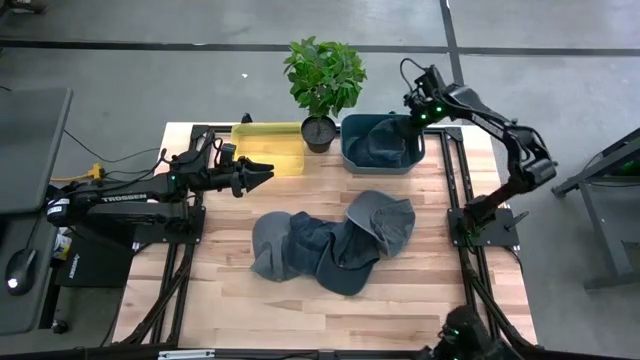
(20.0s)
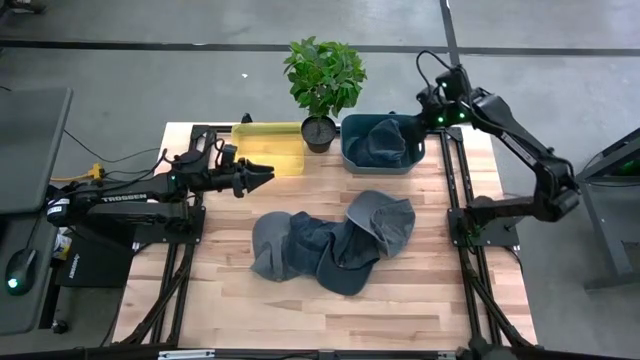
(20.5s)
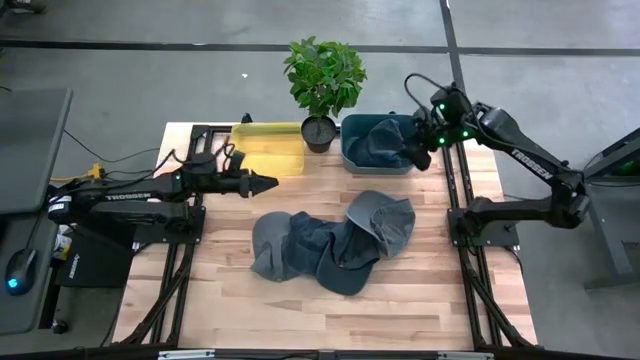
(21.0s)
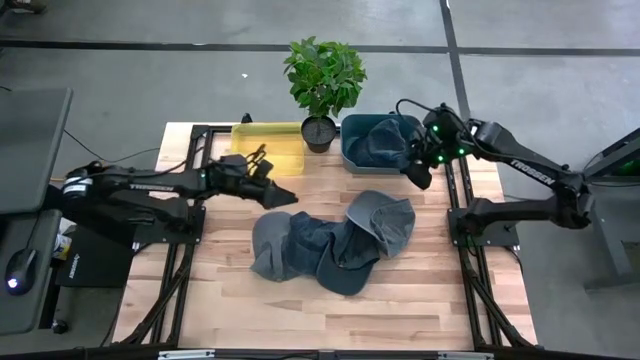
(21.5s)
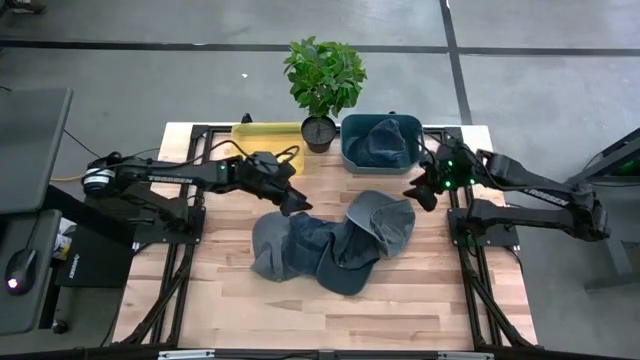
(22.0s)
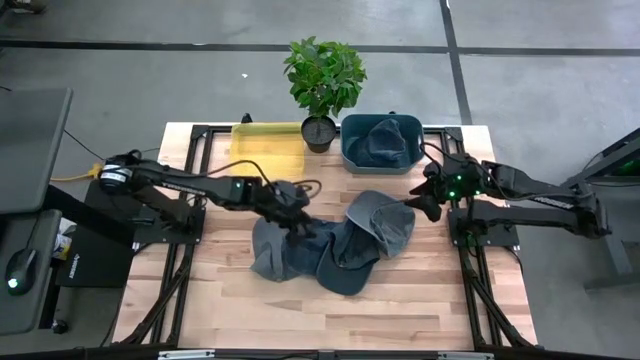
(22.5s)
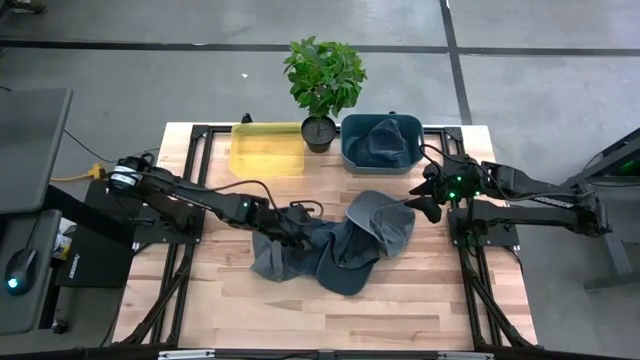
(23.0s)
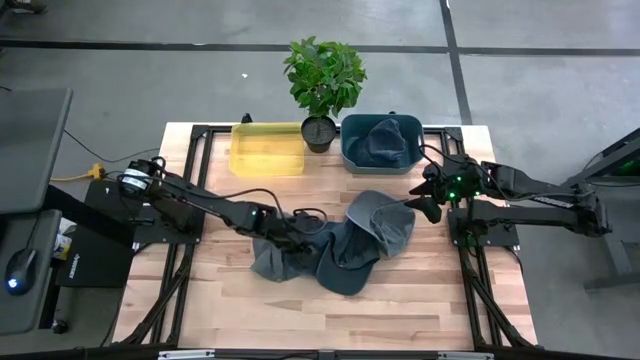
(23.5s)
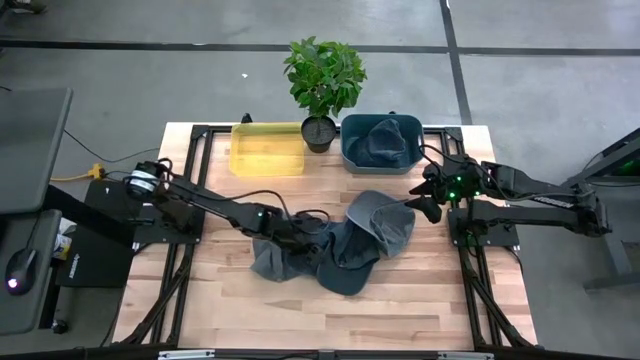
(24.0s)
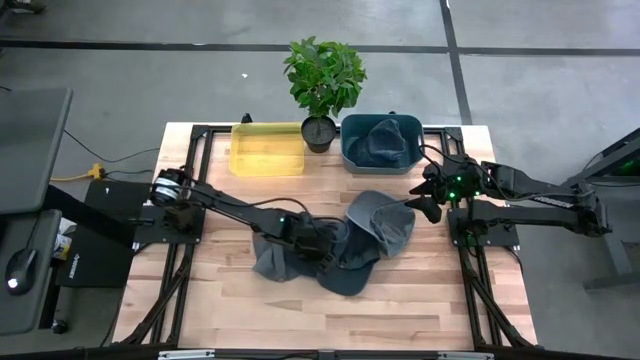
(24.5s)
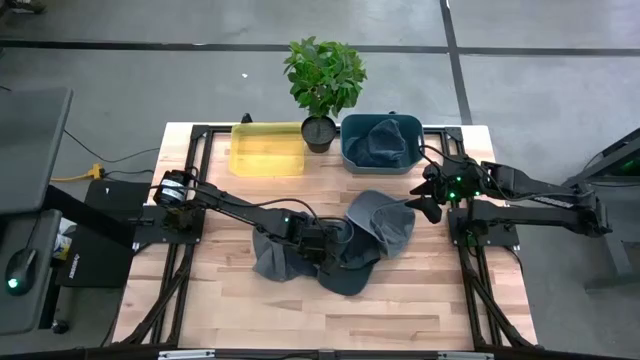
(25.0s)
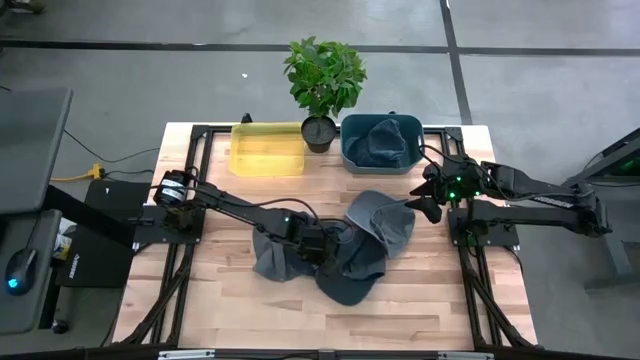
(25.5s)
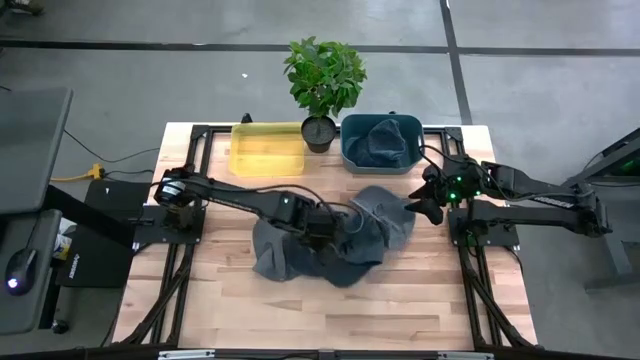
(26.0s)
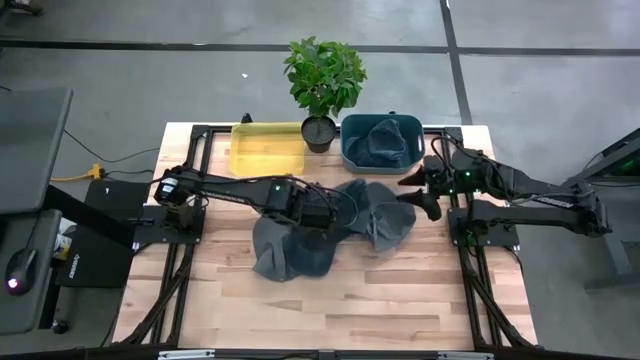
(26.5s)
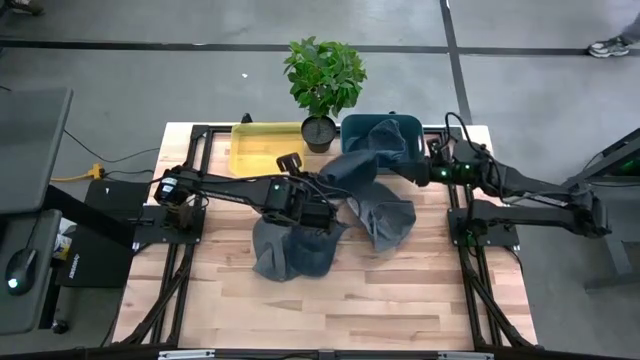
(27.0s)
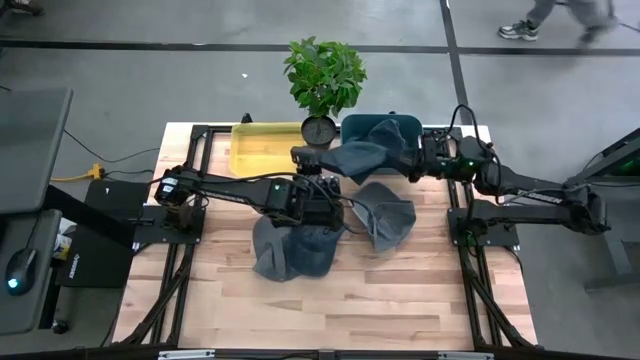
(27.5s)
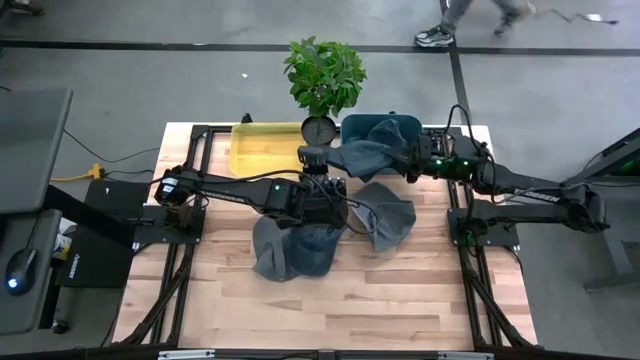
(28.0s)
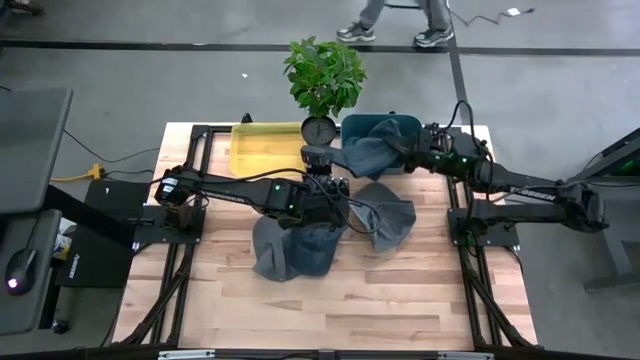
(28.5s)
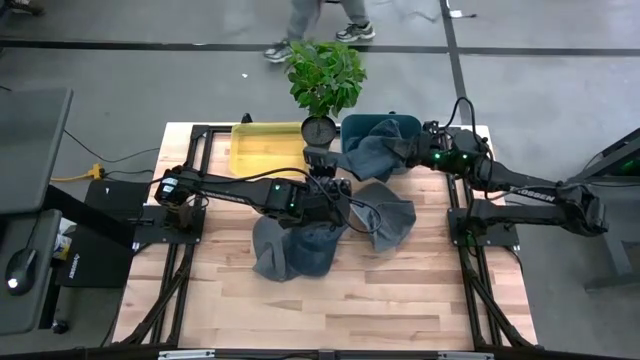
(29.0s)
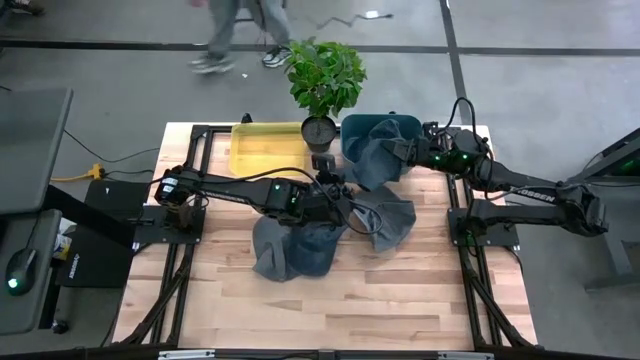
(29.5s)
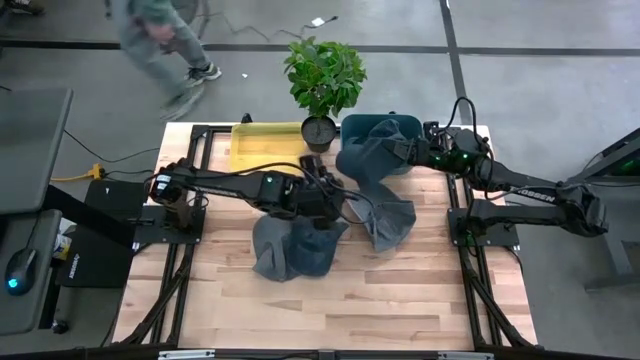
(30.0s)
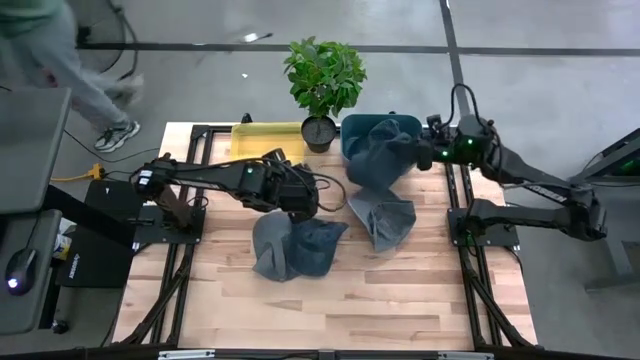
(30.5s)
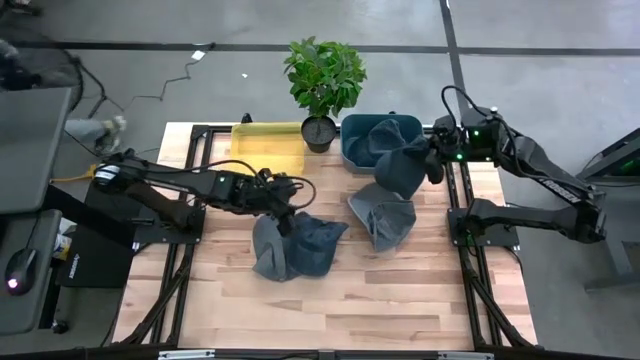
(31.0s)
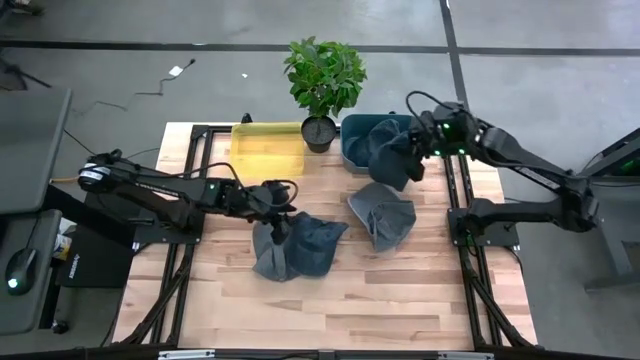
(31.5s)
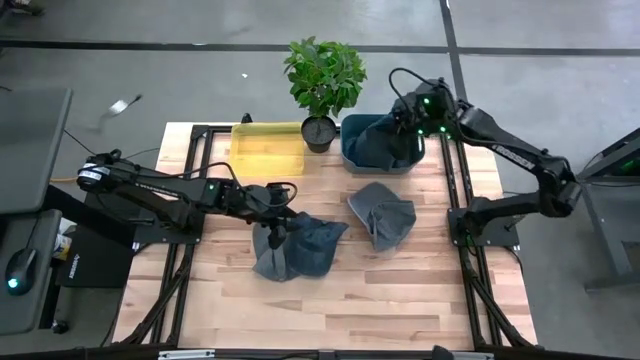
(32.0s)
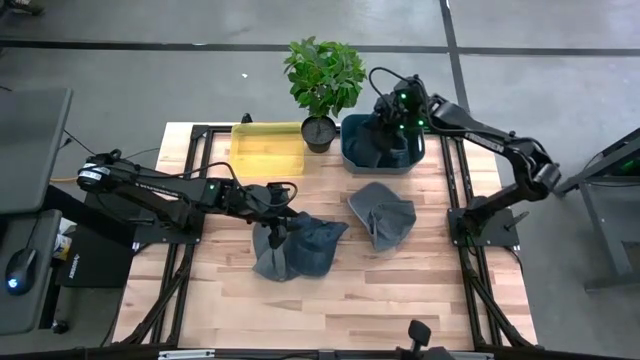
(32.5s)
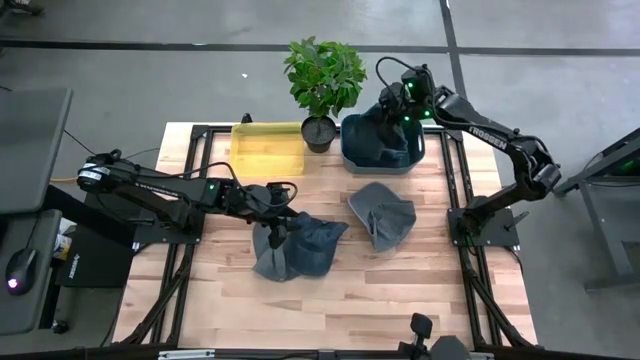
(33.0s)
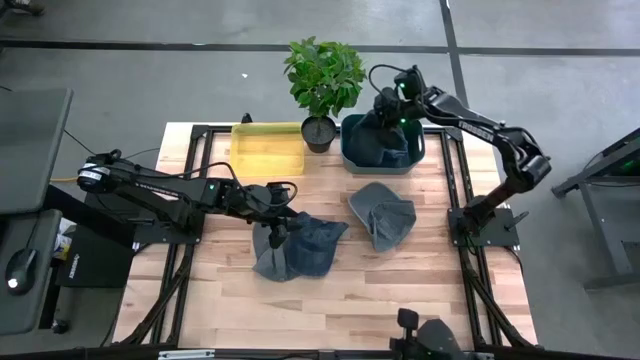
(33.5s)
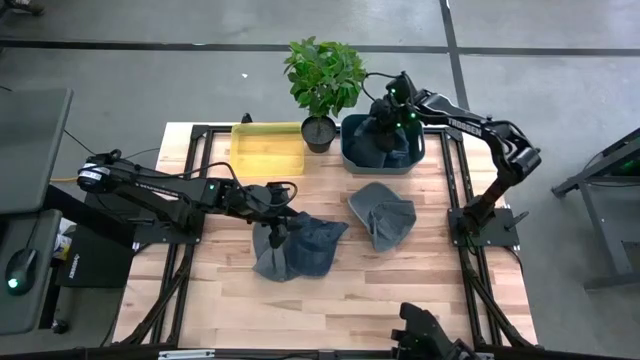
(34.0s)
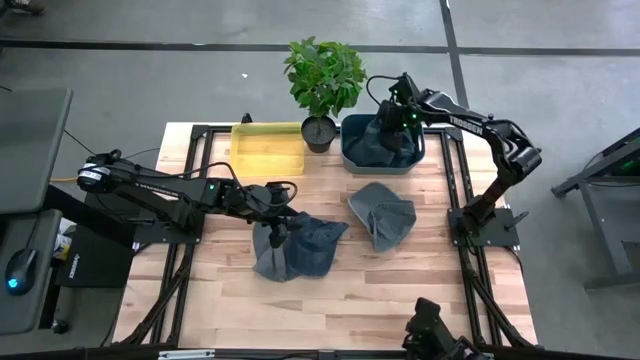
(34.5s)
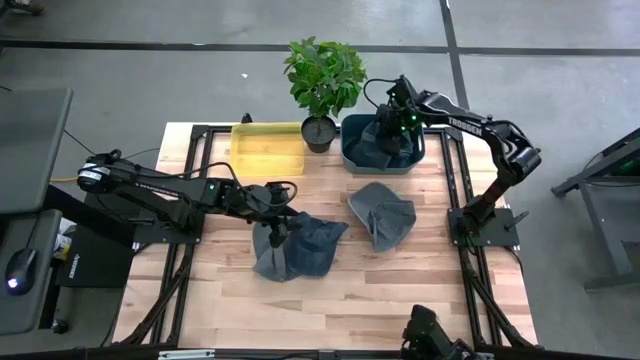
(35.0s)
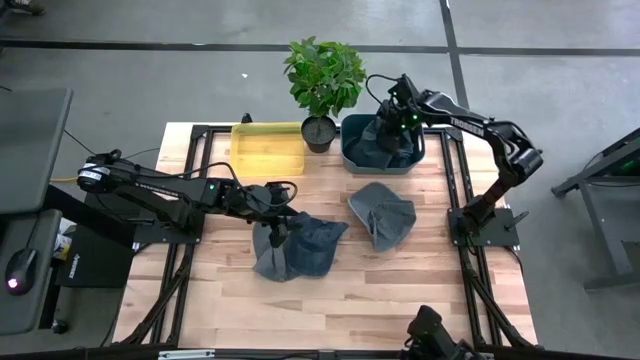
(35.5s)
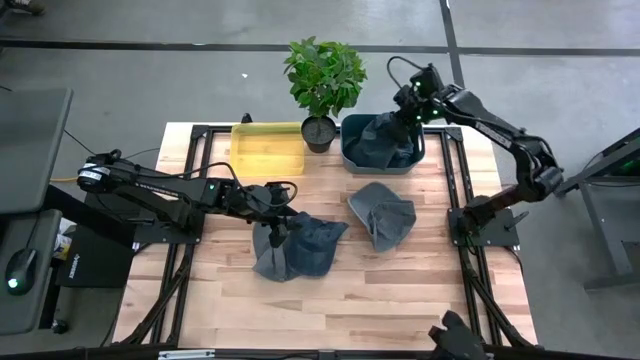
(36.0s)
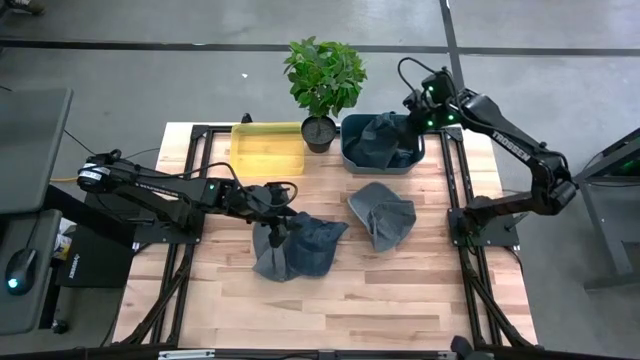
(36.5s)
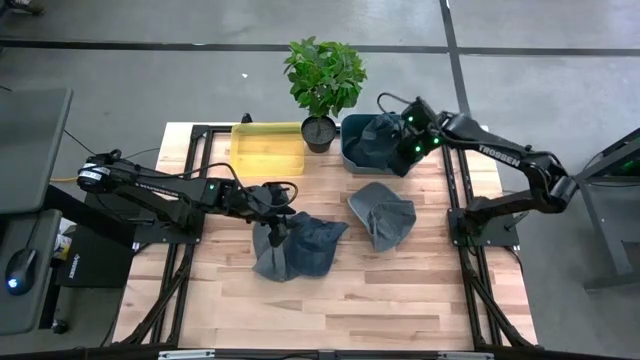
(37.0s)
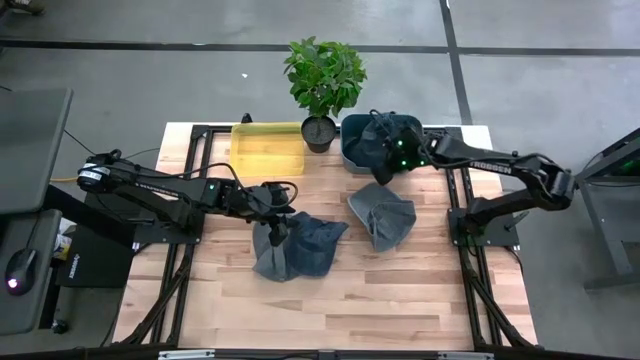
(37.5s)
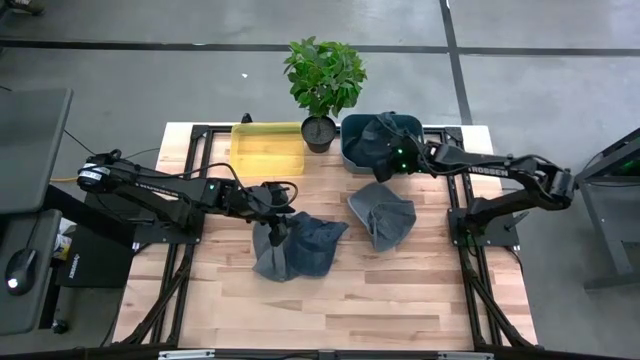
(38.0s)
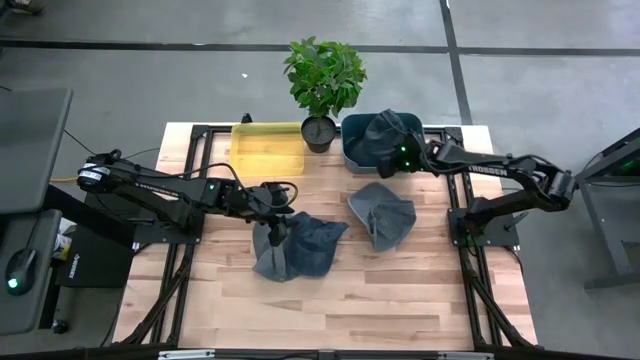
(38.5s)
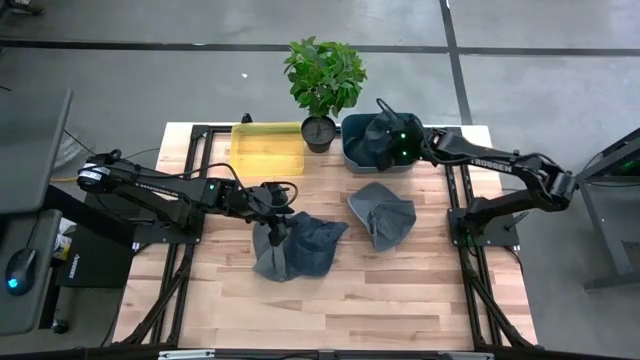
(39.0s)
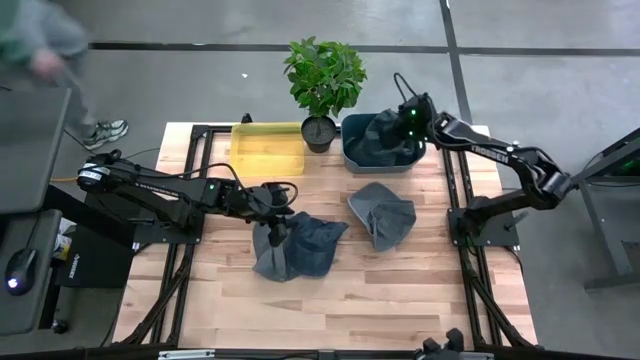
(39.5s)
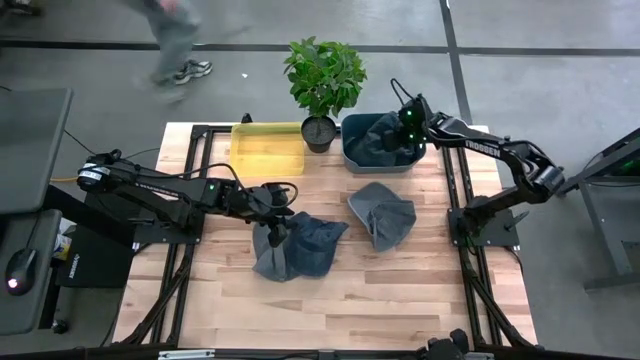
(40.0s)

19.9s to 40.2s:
Task: Pick & Place hat
Put the right blue cap into the blue bin
